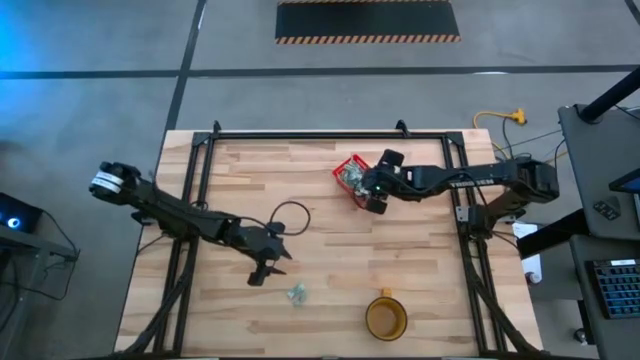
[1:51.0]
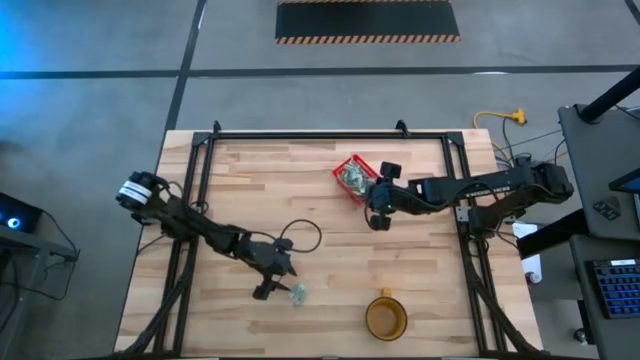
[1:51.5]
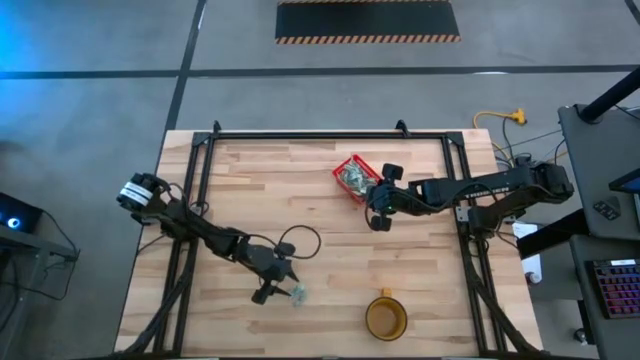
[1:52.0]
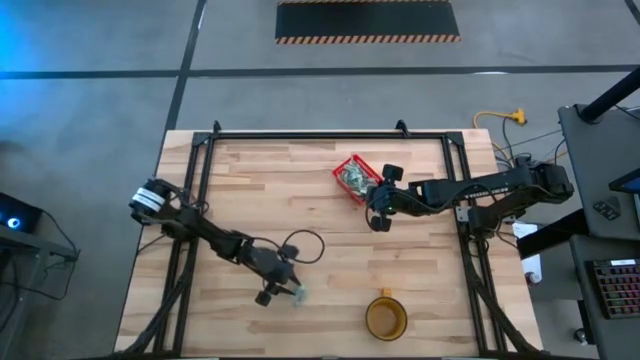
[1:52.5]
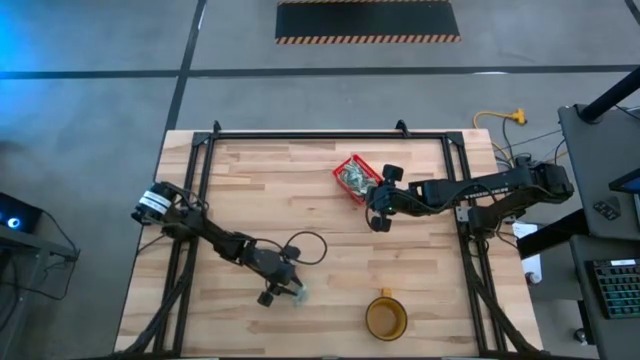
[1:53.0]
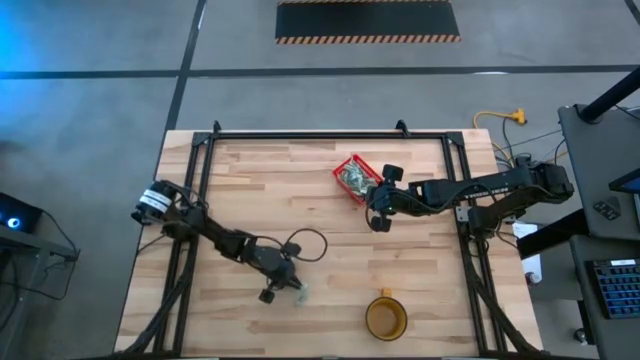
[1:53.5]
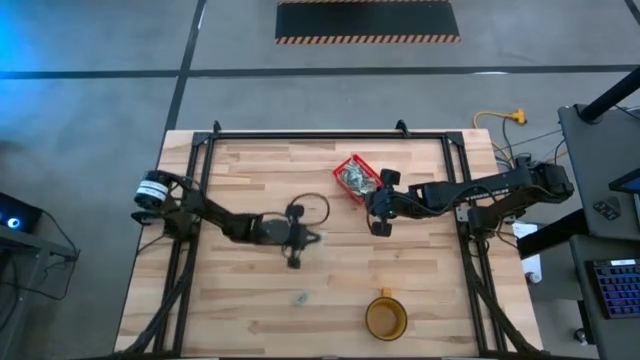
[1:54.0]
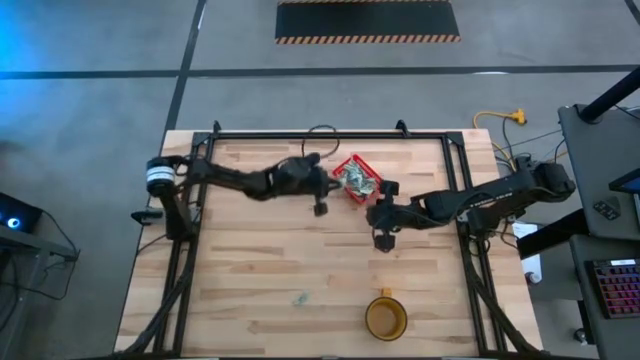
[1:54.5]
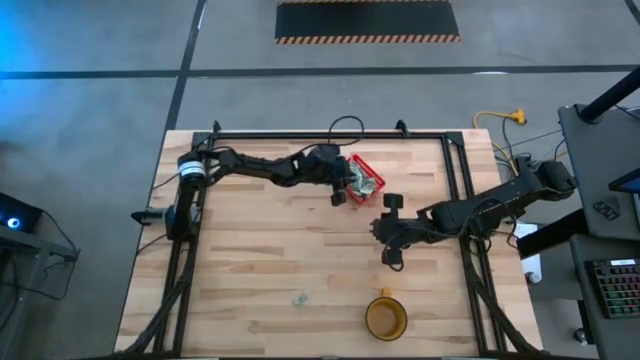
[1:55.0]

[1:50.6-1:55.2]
Task: Pick and place Stevia / Truvia into bins
Put the stevia packet into the red basket

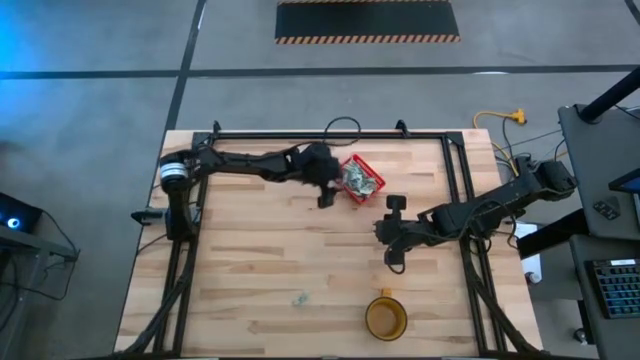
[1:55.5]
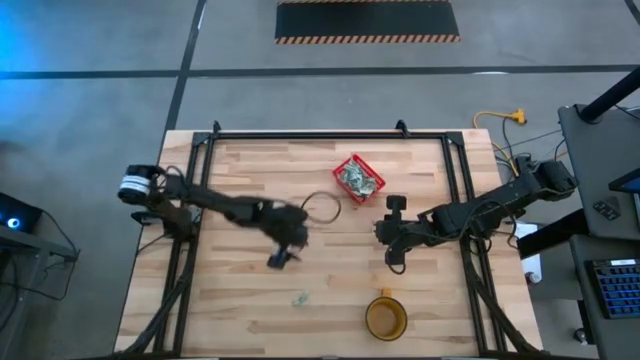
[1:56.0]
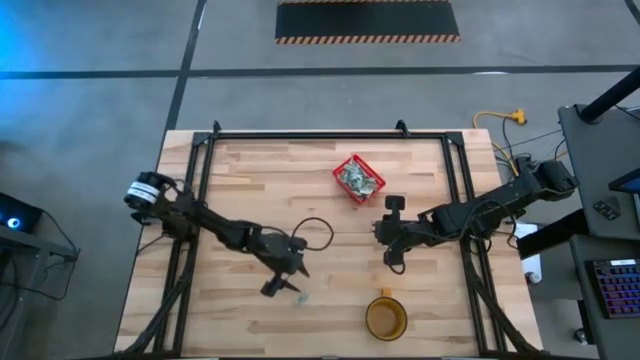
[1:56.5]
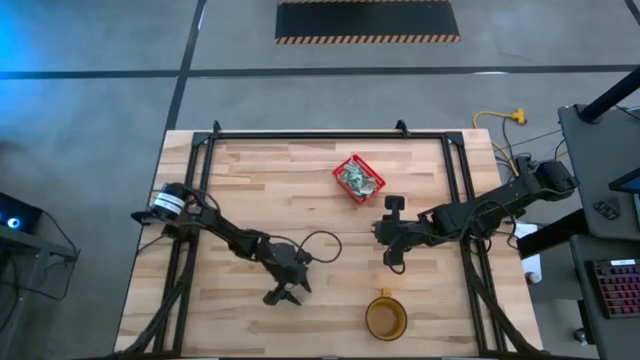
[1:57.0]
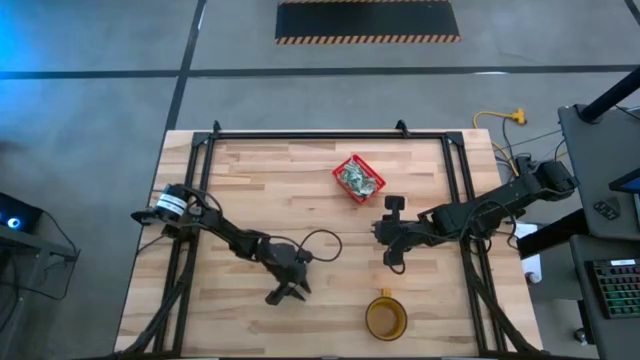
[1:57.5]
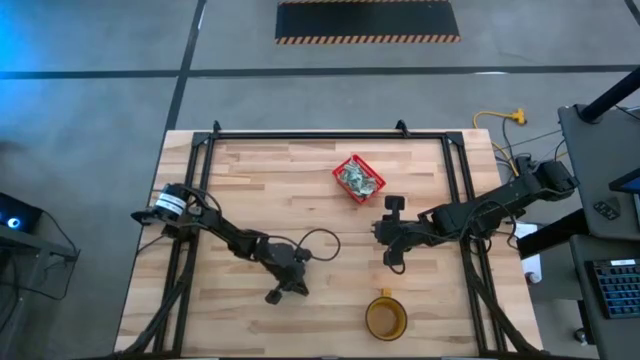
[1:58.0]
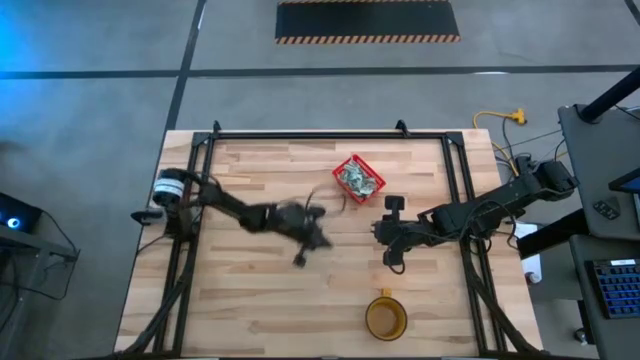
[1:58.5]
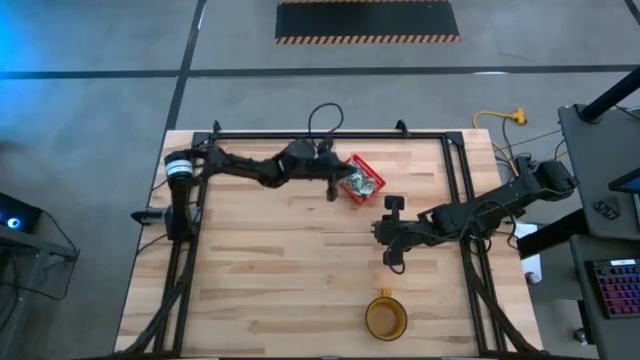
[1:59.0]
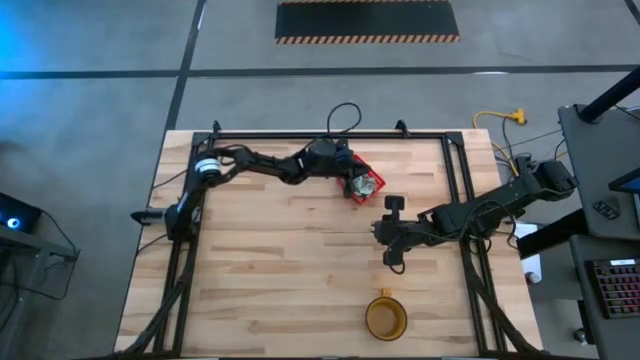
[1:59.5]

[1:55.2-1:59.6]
Put the stevia packet into the red basket

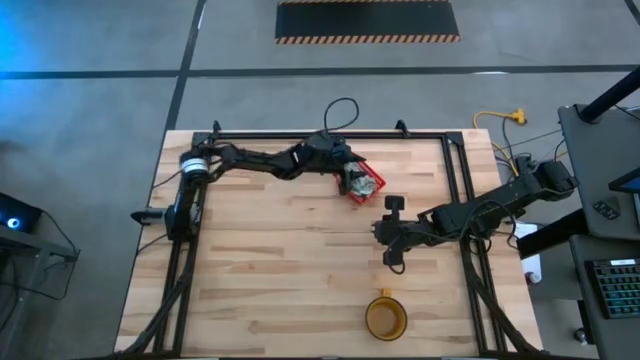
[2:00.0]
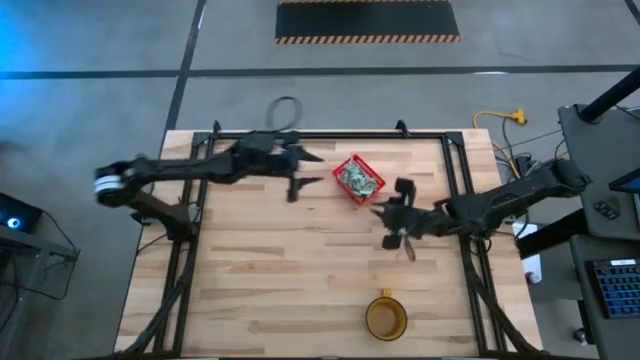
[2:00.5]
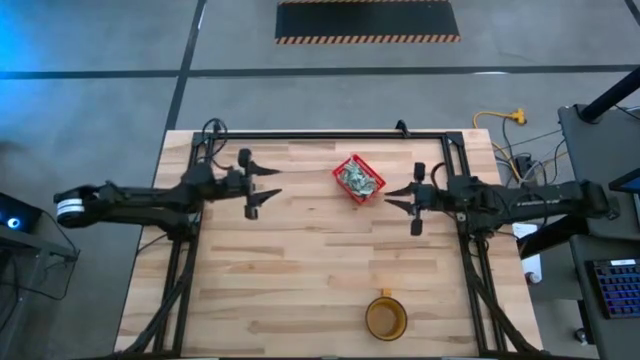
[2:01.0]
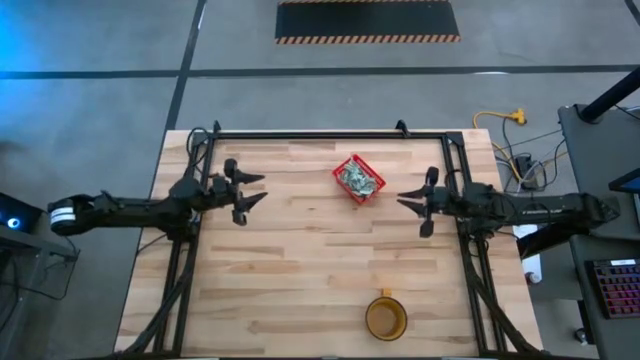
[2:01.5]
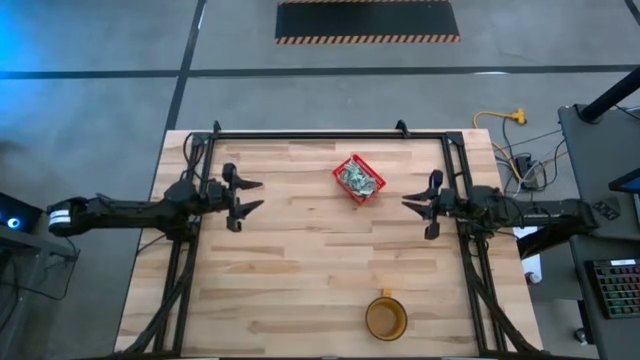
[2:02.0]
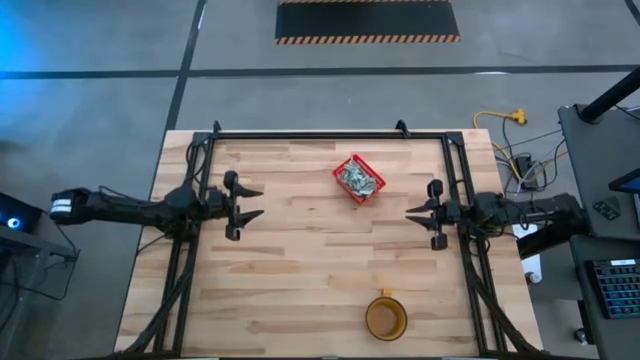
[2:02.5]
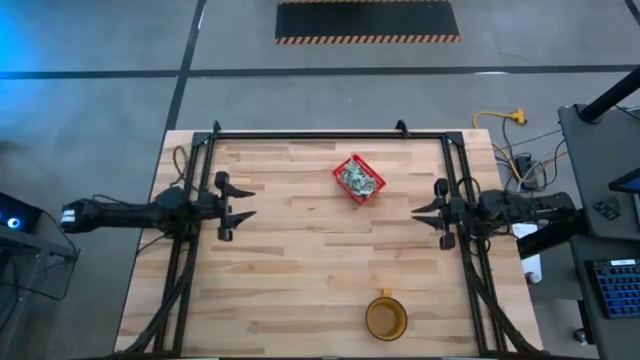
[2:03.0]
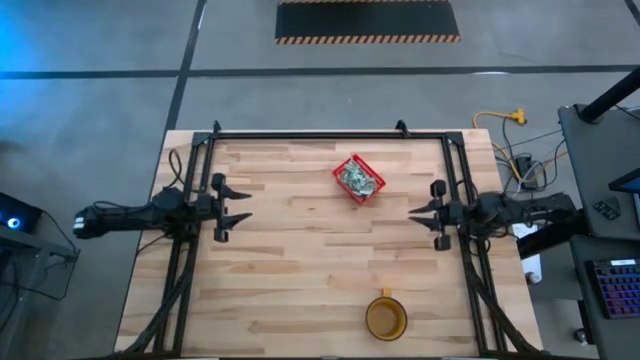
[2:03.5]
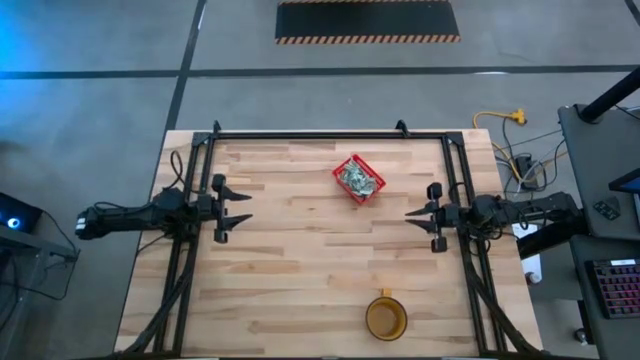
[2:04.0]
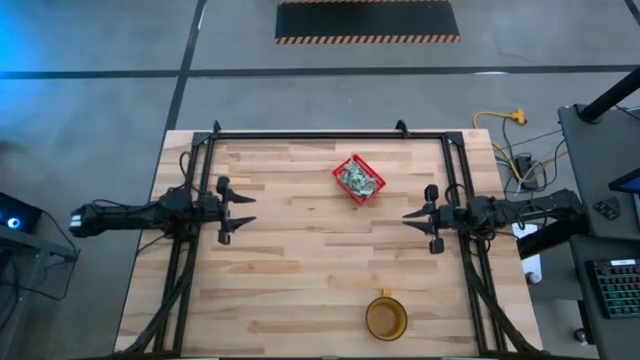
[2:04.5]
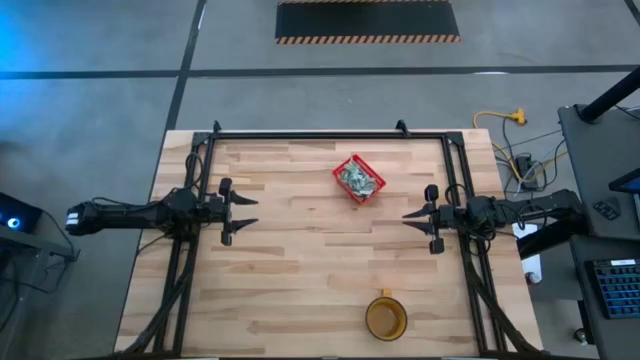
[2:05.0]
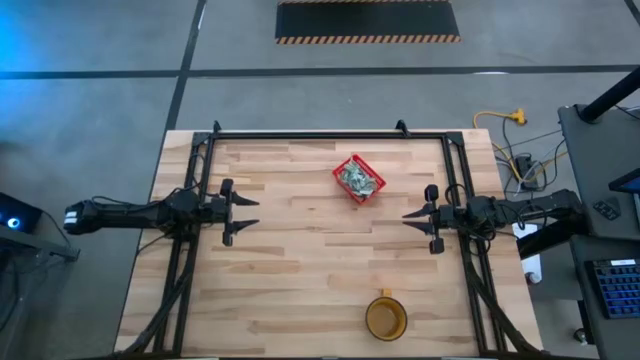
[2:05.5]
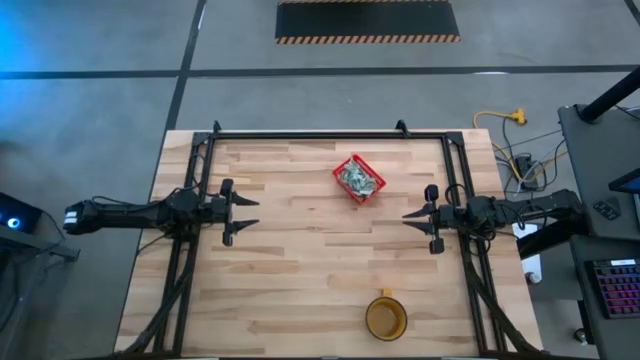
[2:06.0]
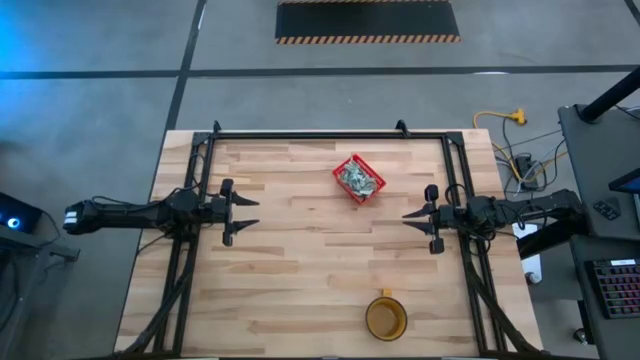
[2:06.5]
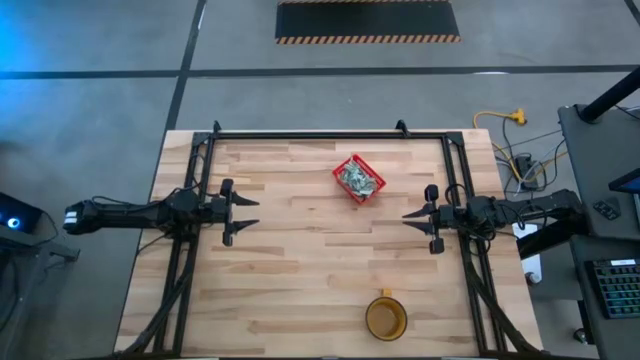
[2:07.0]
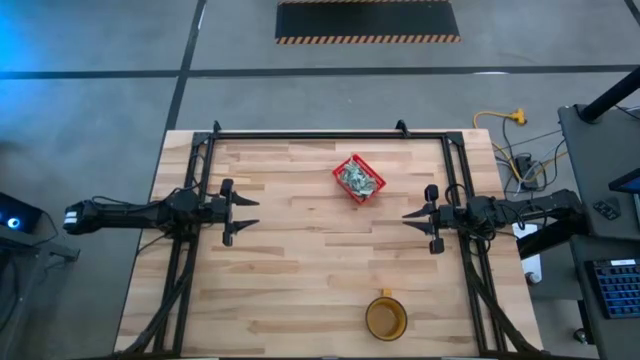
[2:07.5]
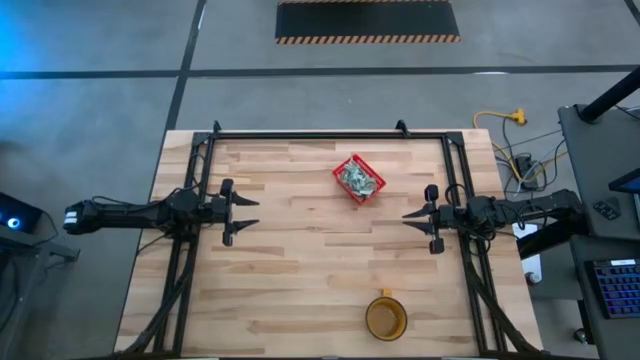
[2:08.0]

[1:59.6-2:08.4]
Return to Home Position

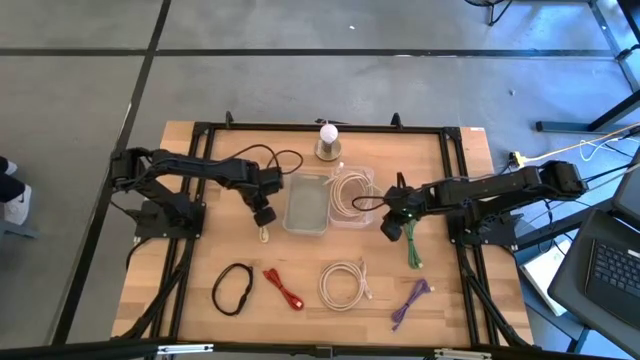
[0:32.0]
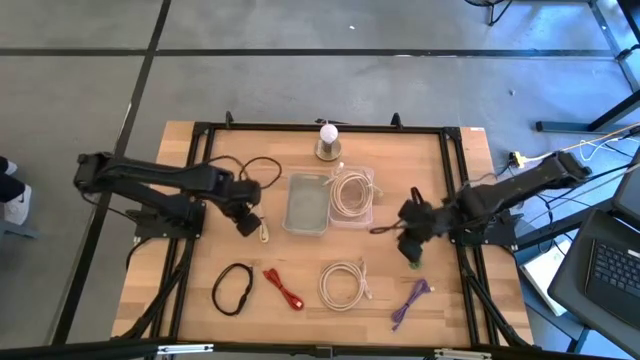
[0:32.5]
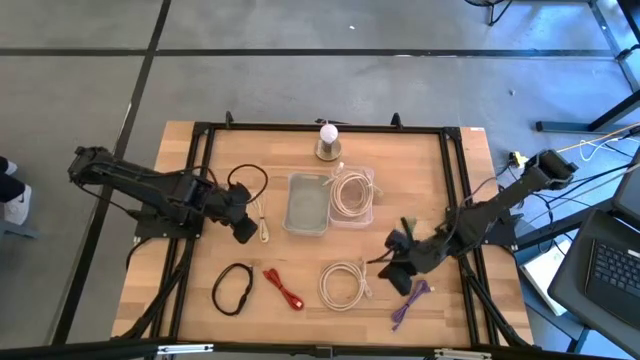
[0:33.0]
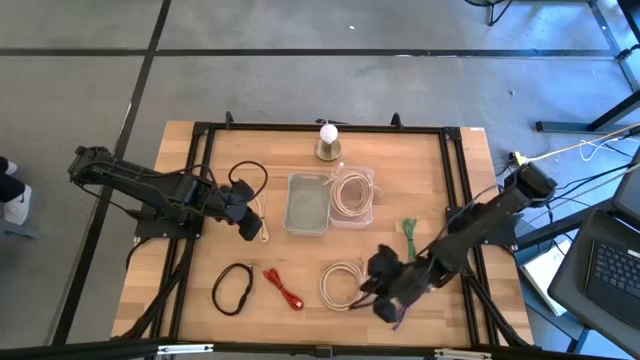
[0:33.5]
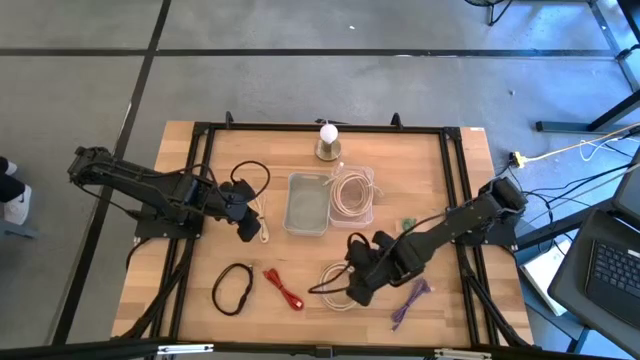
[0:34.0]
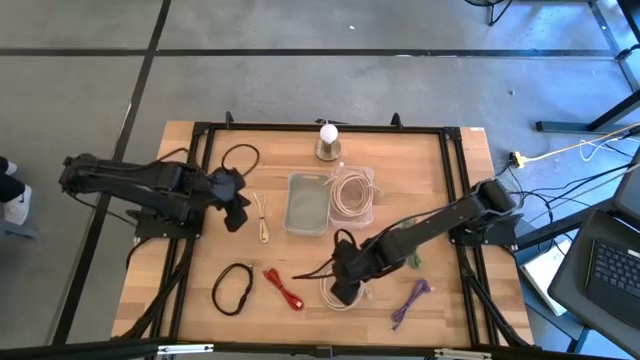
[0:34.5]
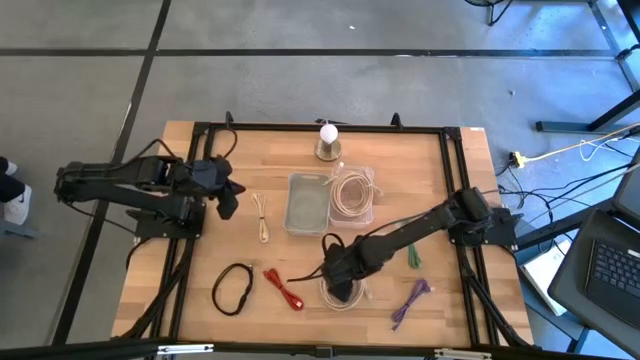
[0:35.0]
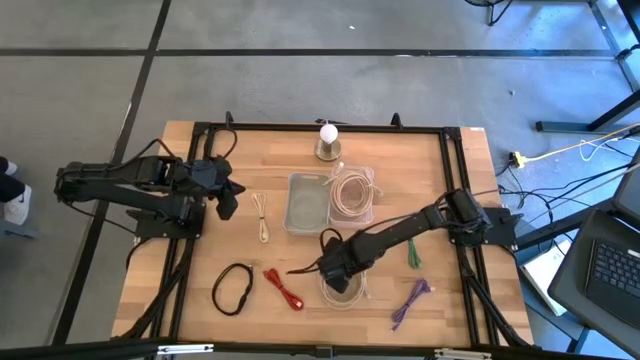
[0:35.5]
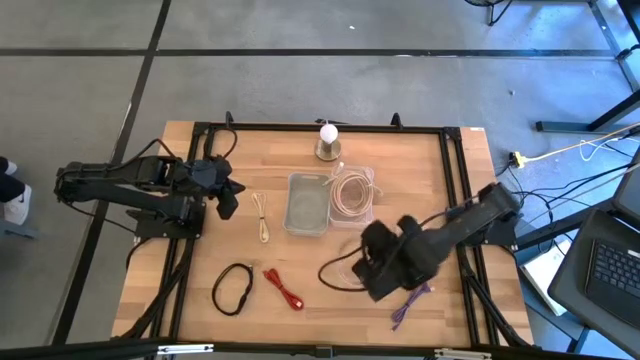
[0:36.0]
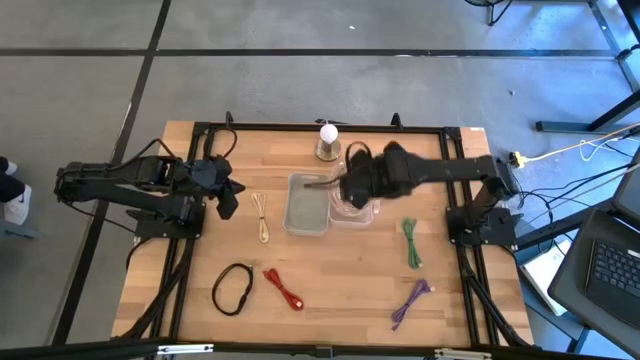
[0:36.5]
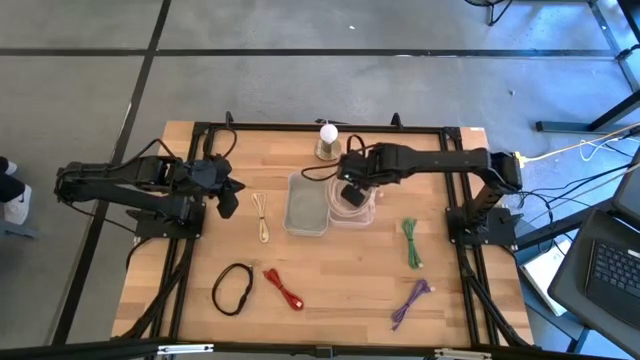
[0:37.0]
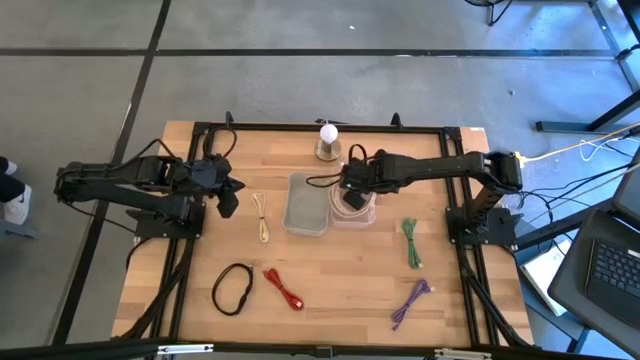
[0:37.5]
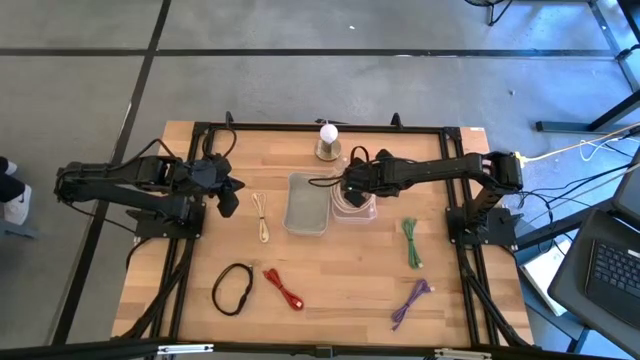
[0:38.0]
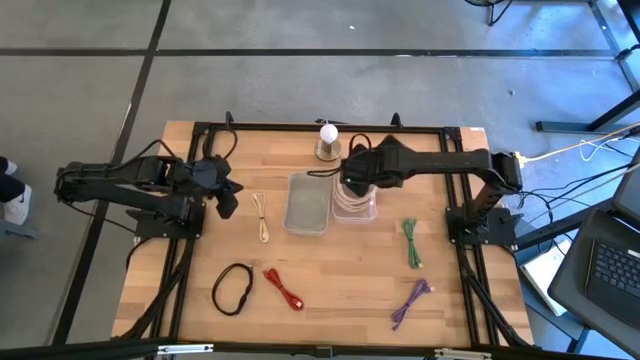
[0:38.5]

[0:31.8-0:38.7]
Task: Pick and place USB-C Cables
Put the white usb cable into the transparent bin
